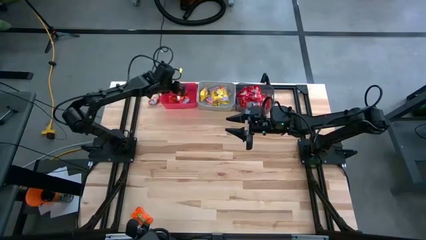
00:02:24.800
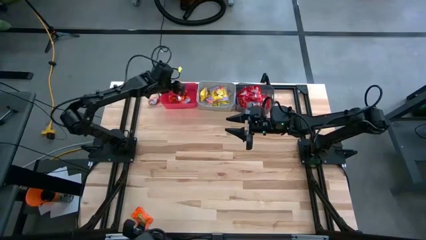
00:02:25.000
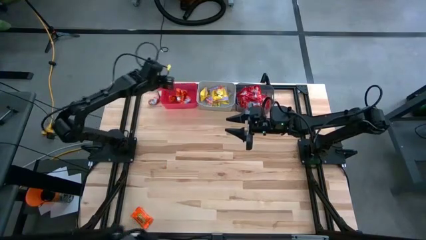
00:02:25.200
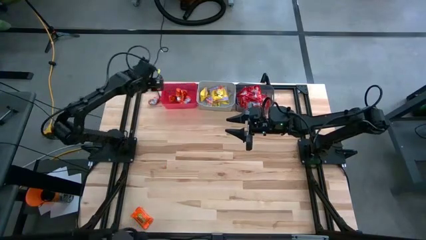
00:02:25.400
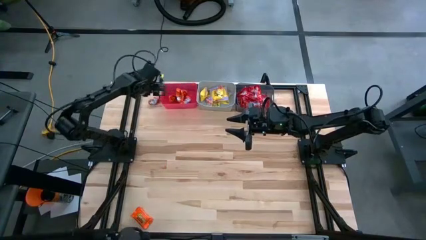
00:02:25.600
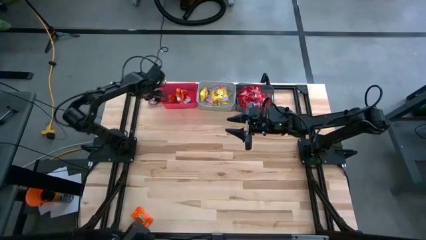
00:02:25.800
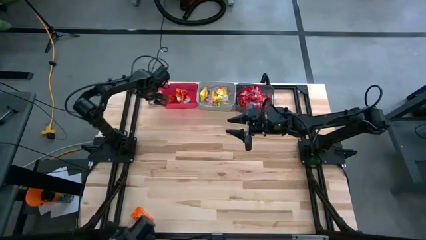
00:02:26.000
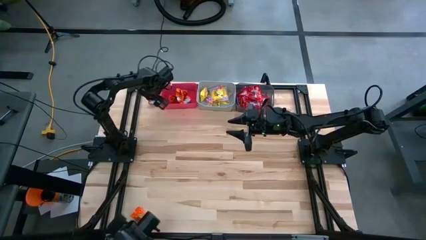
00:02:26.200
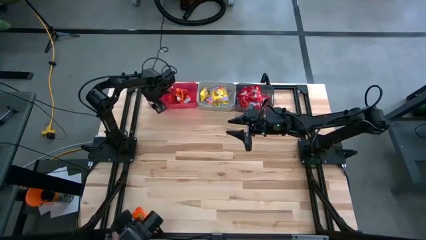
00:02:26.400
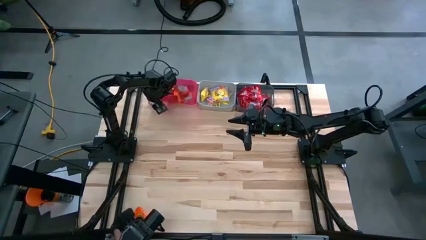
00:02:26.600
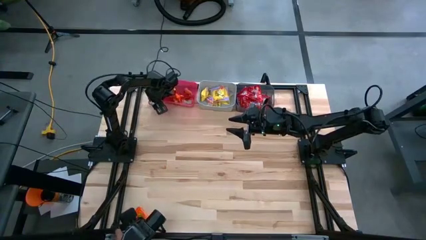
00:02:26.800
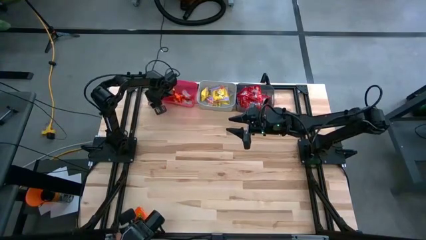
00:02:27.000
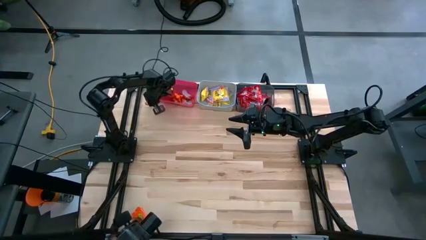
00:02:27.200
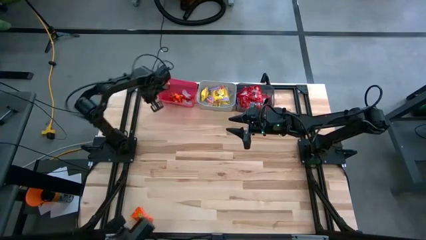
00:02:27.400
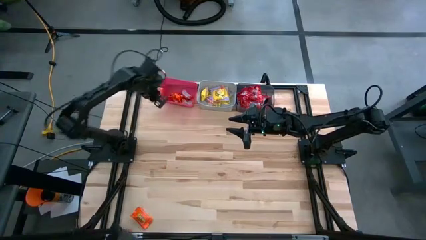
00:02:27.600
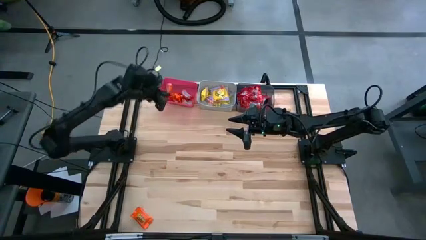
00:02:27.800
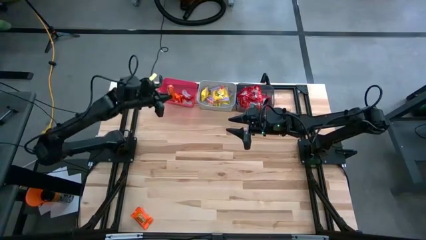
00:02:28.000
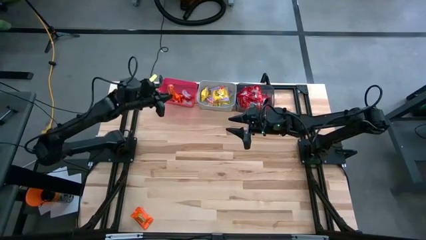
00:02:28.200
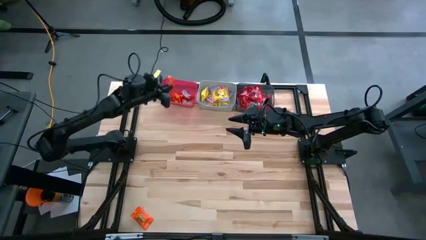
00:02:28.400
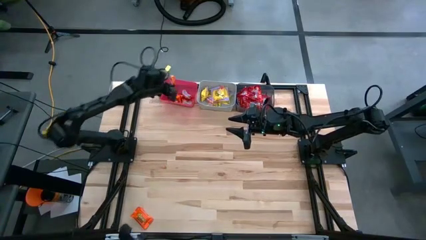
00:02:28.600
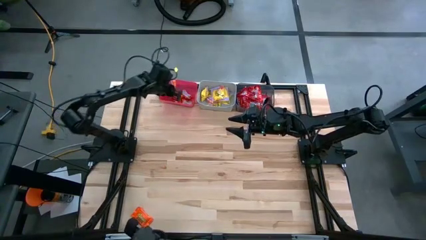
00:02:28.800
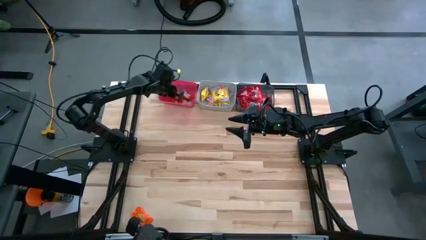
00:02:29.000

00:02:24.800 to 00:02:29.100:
Task: Sort candy
Put the orange candy into the red bin

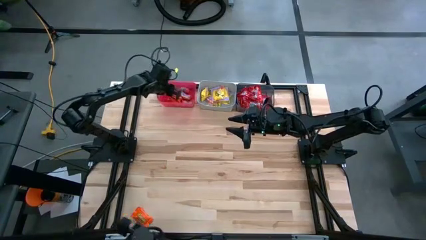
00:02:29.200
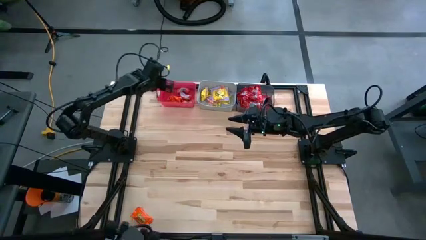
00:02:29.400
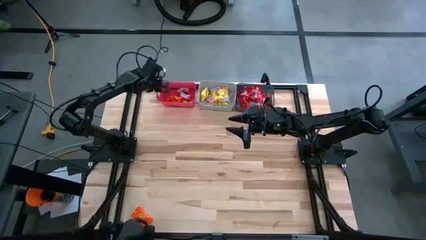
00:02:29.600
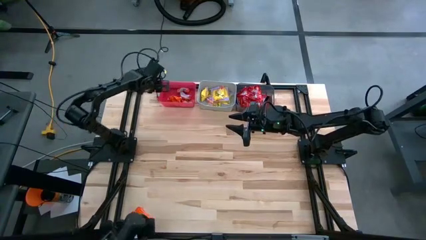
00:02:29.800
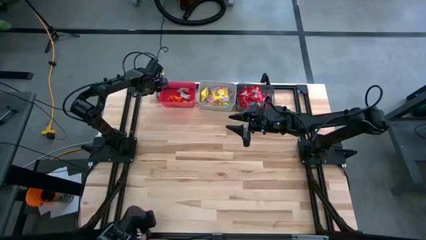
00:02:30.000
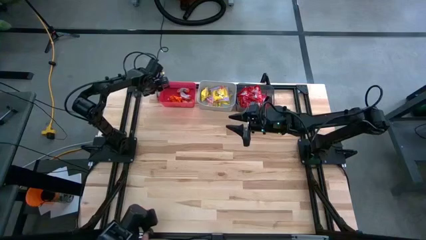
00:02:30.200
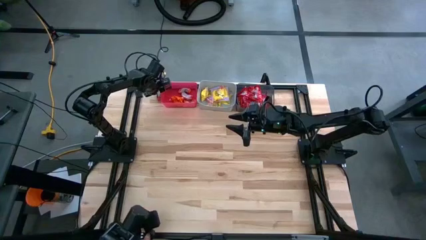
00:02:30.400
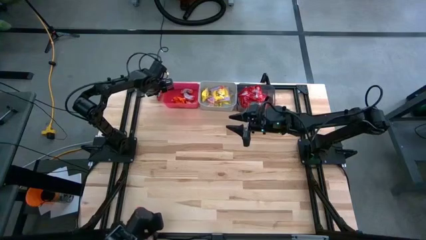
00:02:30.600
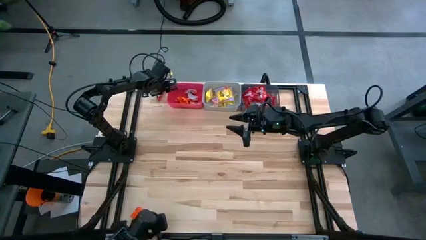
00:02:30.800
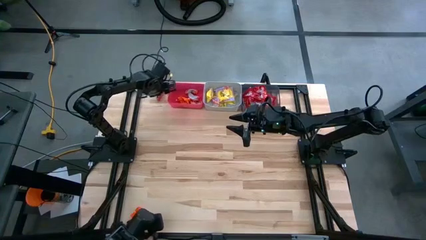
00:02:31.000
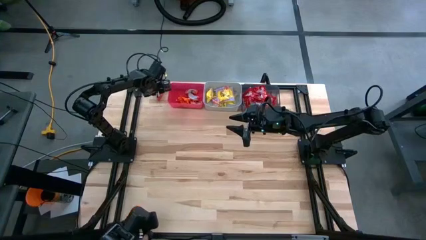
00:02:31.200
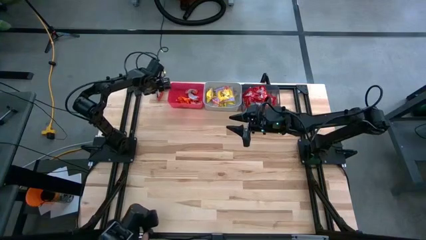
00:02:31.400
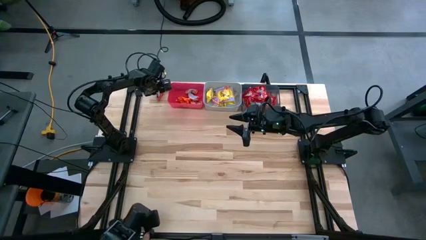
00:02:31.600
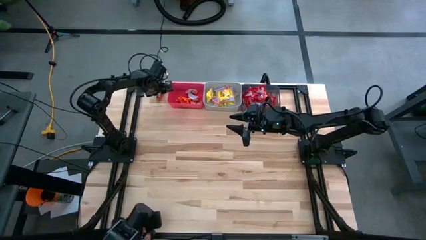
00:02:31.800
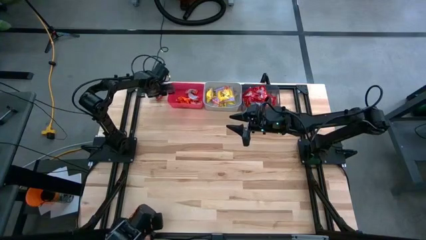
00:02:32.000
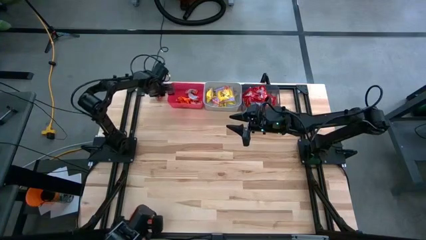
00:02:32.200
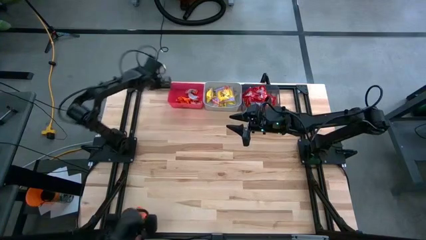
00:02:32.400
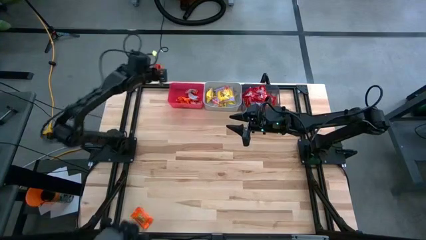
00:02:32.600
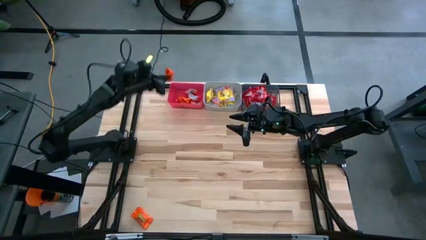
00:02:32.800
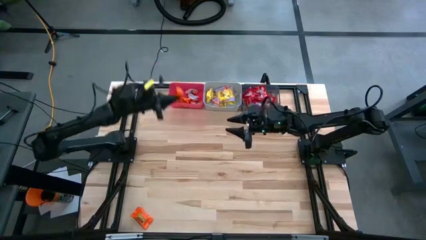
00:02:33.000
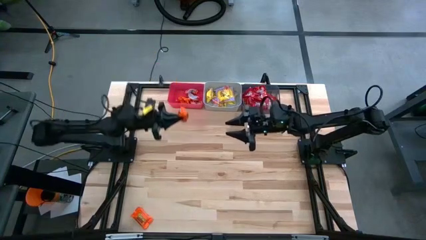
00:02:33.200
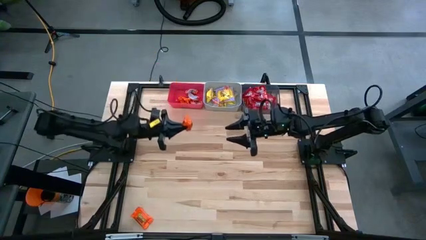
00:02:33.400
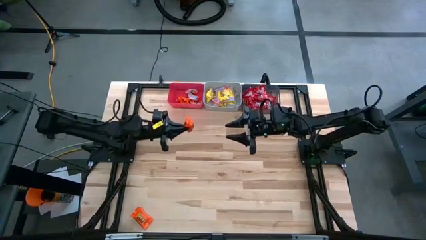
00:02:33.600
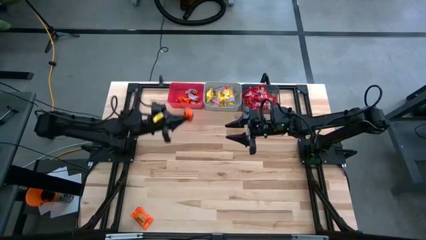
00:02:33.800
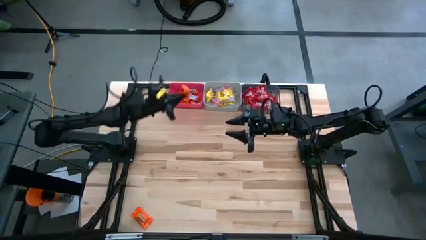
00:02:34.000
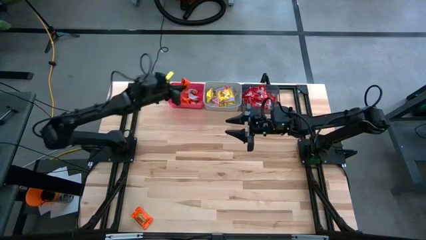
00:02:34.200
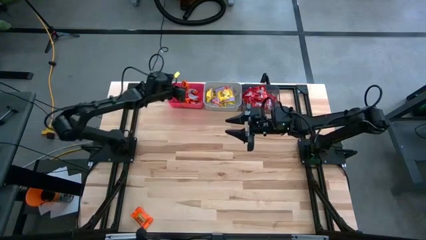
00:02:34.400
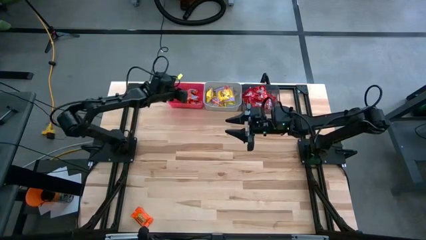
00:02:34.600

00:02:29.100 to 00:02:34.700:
Put the orange candy into the red bin

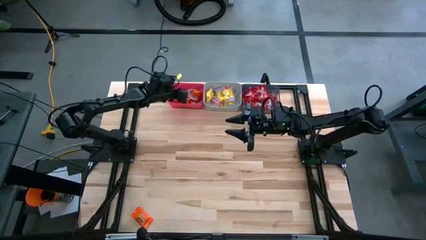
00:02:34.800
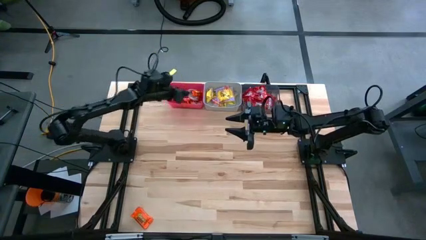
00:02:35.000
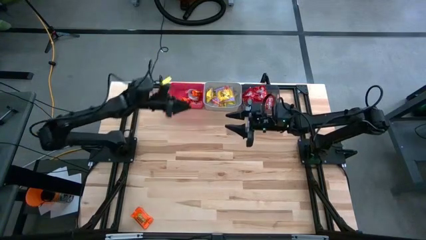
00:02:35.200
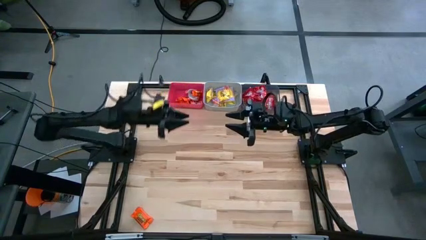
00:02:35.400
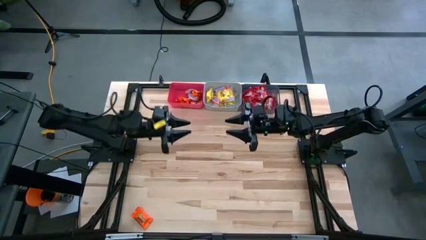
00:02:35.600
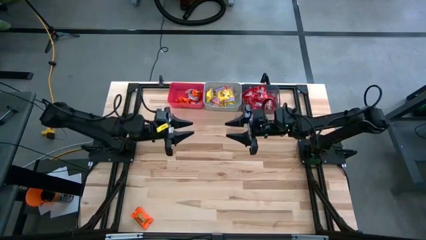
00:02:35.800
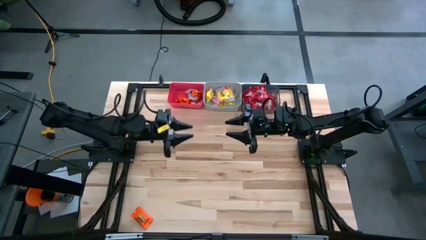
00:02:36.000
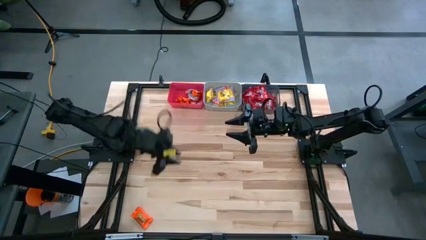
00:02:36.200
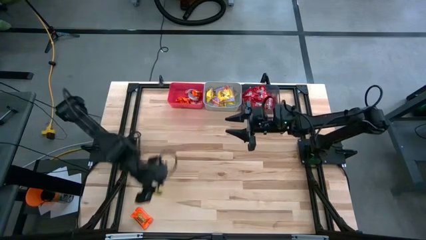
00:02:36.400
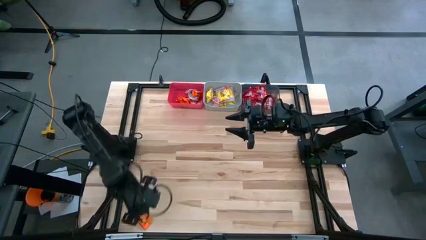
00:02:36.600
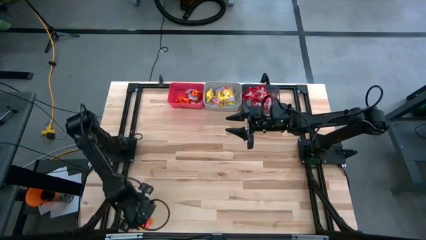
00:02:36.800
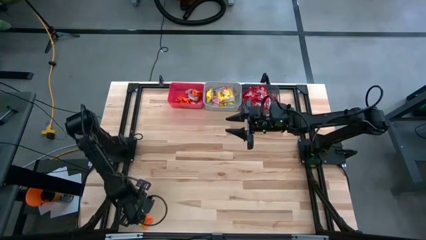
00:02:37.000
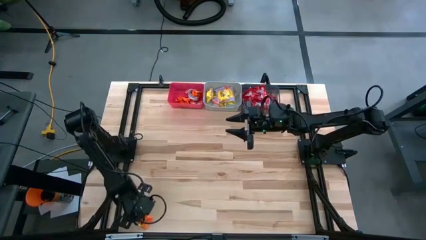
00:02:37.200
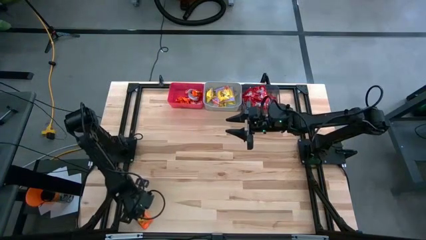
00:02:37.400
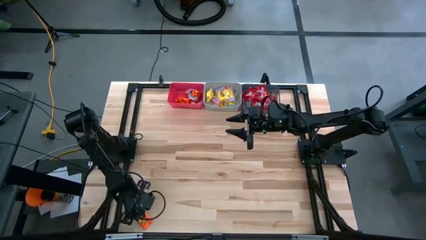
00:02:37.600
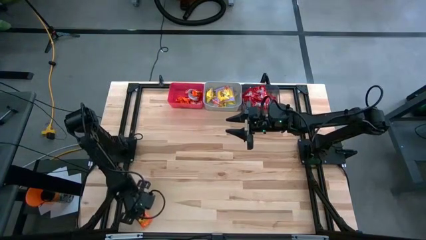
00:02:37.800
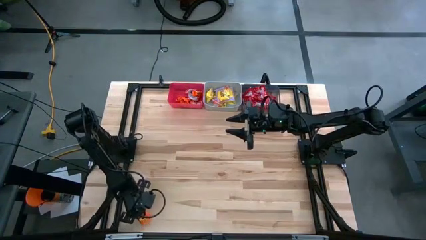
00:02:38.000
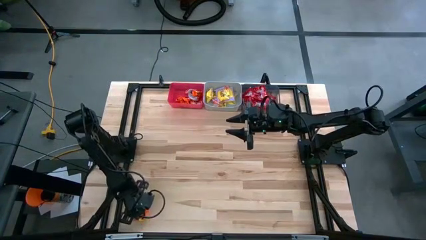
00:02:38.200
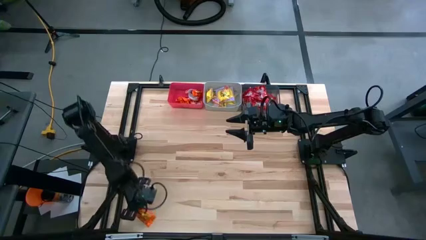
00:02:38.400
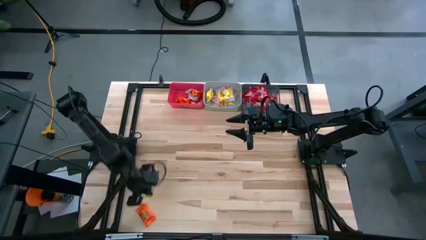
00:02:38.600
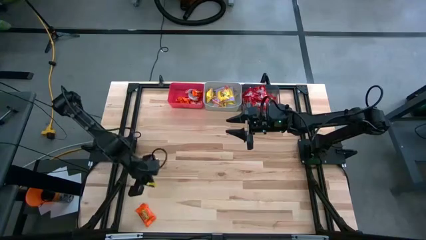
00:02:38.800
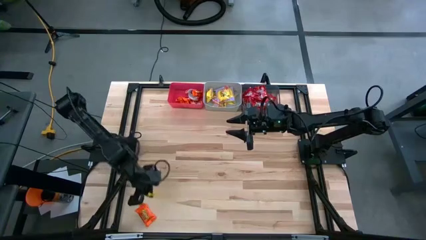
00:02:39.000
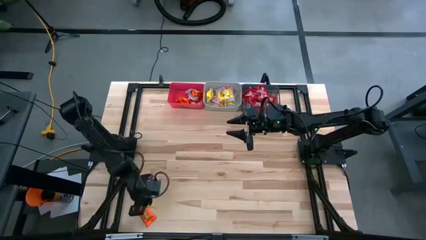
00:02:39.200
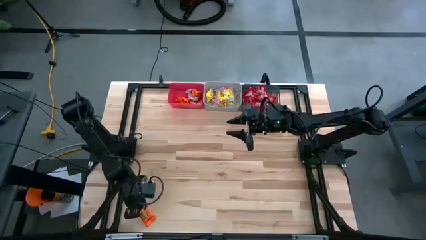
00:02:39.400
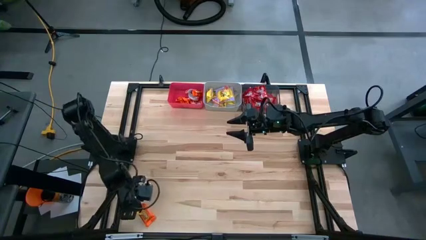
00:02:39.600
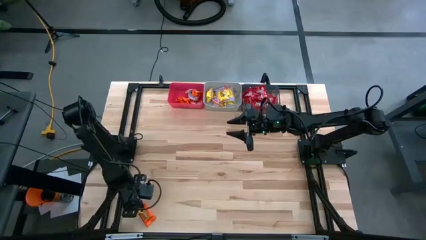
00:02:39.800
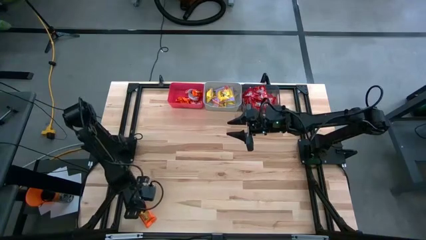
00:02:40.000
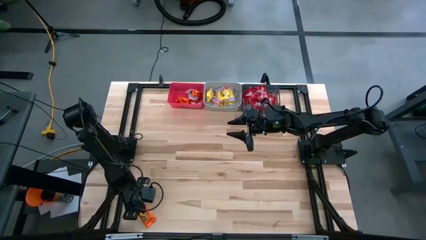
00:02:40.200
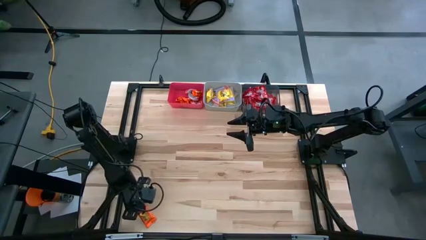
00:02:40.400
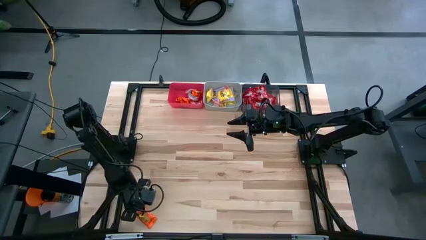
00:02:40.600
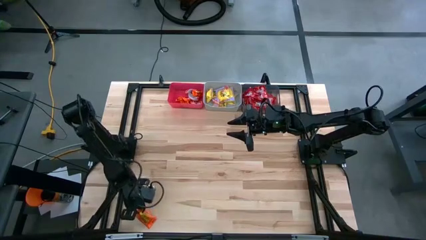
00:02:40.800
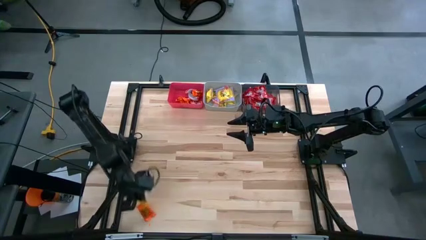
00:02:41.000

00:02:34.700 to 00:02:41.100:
Put the orange candy into the red bin
